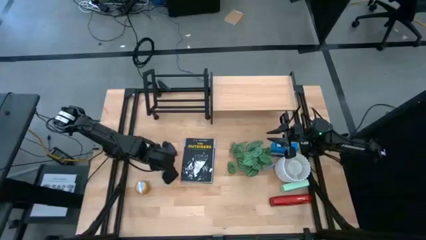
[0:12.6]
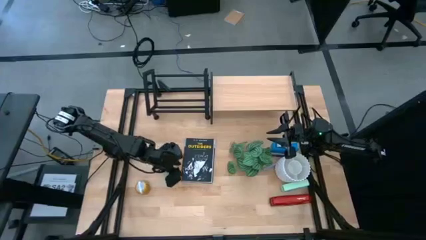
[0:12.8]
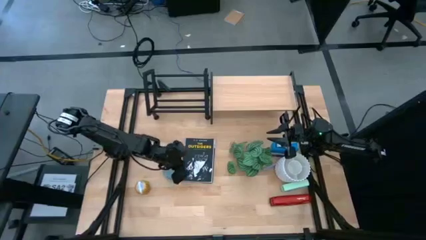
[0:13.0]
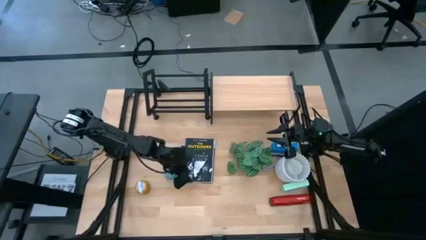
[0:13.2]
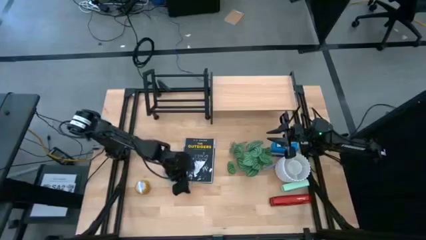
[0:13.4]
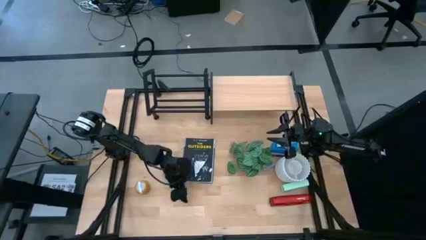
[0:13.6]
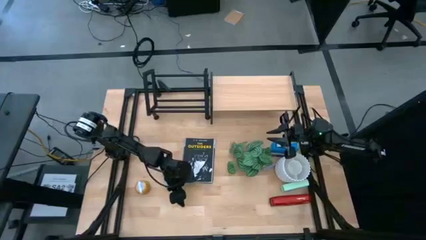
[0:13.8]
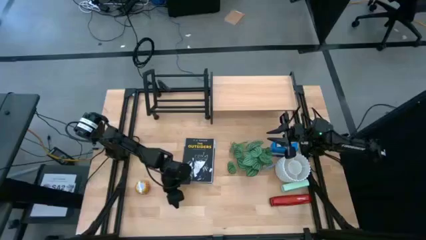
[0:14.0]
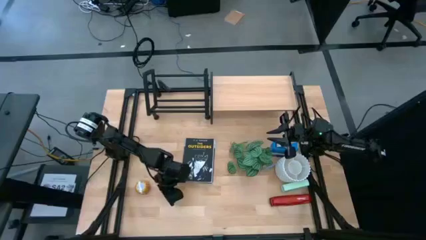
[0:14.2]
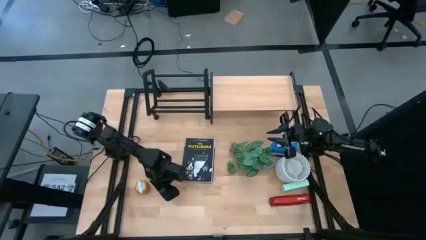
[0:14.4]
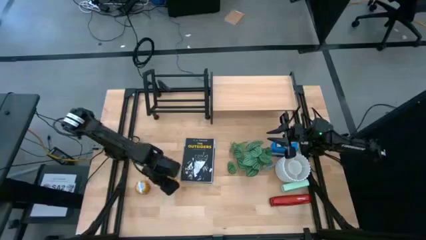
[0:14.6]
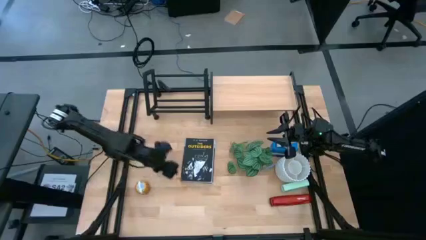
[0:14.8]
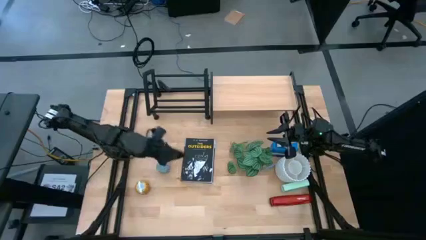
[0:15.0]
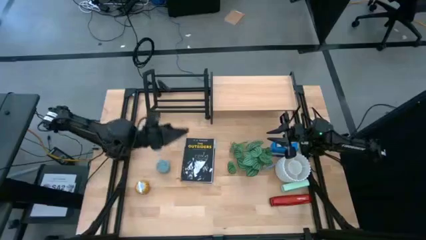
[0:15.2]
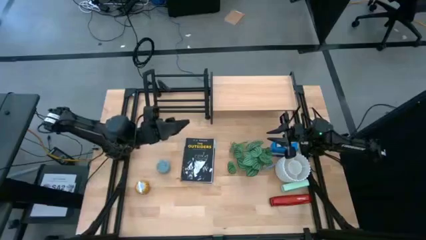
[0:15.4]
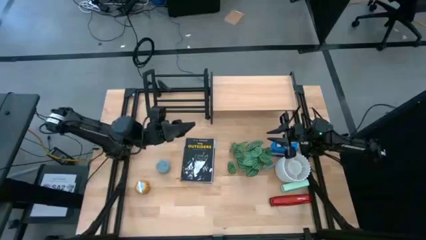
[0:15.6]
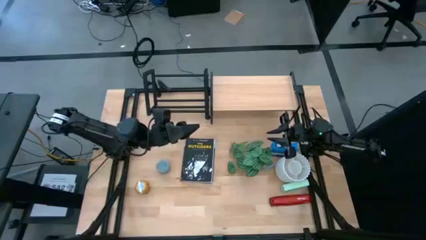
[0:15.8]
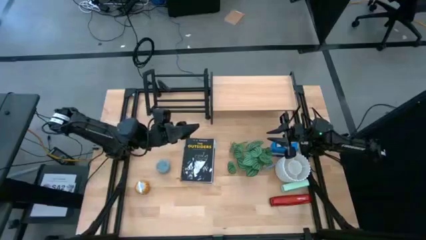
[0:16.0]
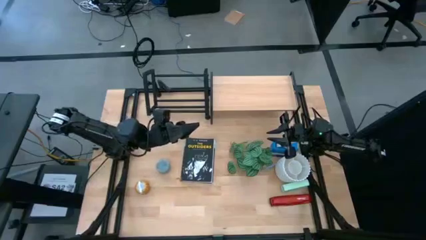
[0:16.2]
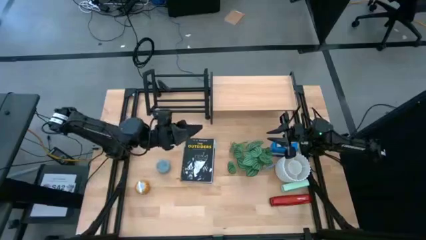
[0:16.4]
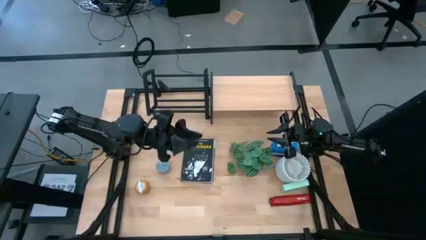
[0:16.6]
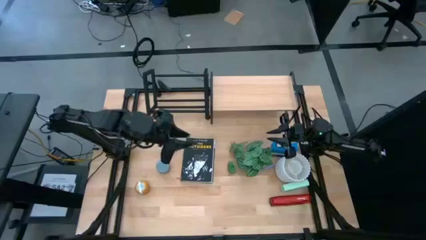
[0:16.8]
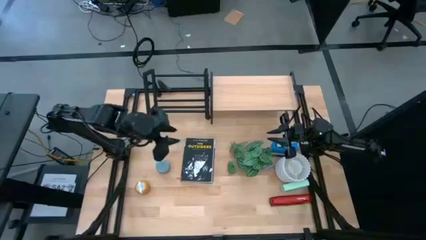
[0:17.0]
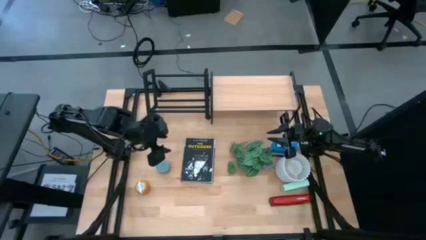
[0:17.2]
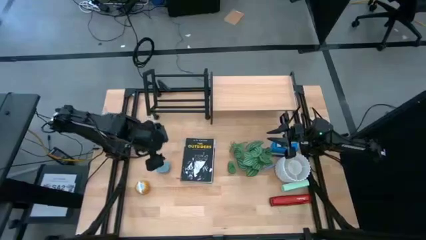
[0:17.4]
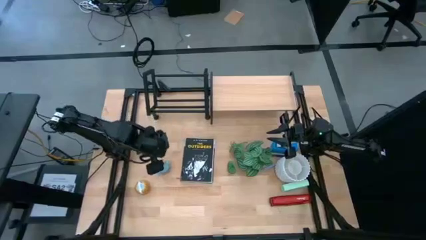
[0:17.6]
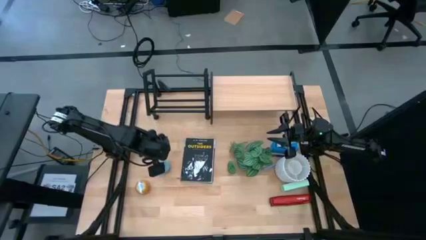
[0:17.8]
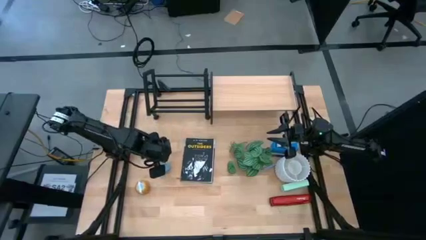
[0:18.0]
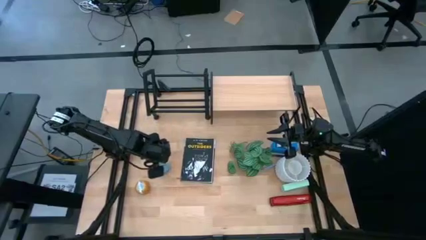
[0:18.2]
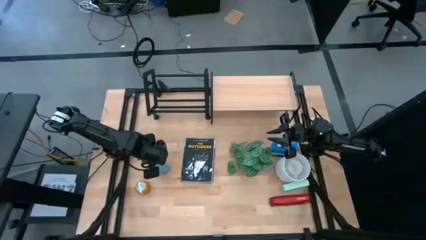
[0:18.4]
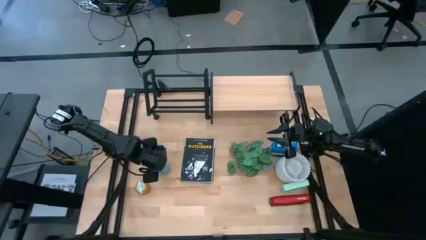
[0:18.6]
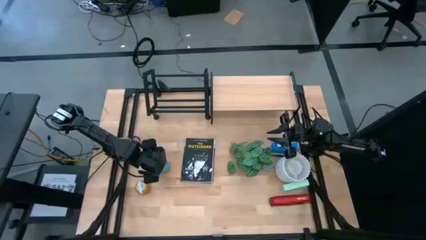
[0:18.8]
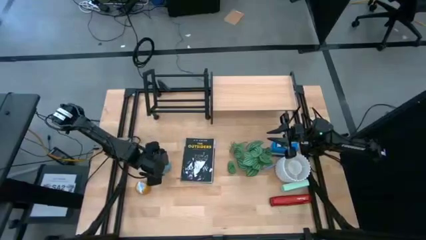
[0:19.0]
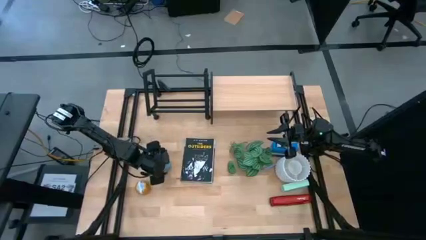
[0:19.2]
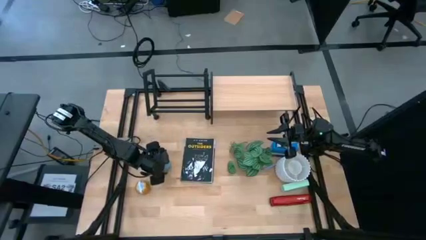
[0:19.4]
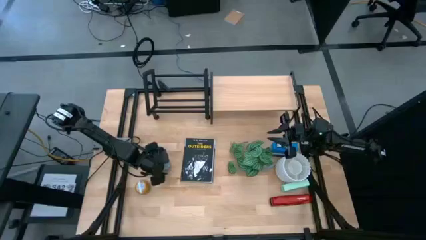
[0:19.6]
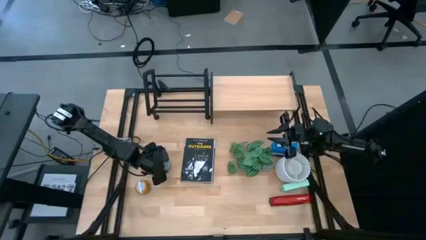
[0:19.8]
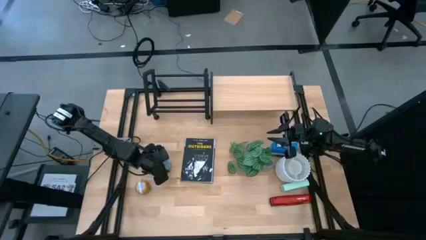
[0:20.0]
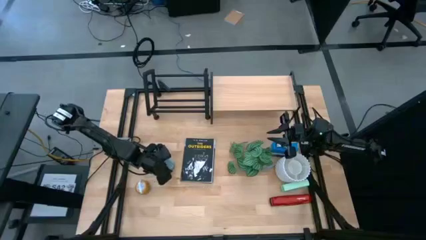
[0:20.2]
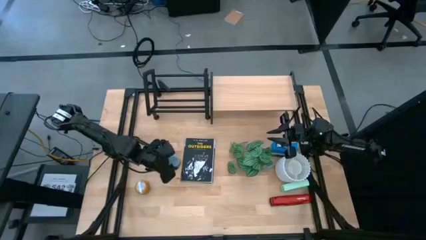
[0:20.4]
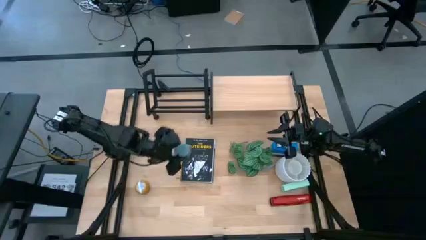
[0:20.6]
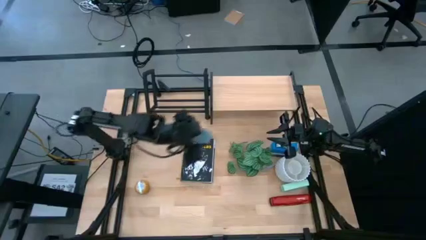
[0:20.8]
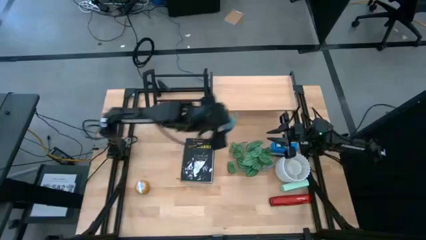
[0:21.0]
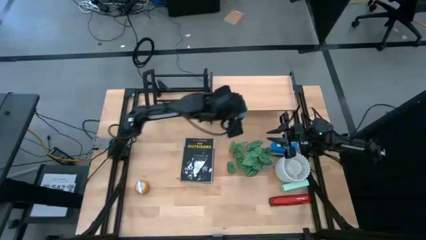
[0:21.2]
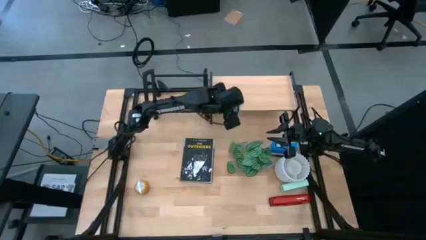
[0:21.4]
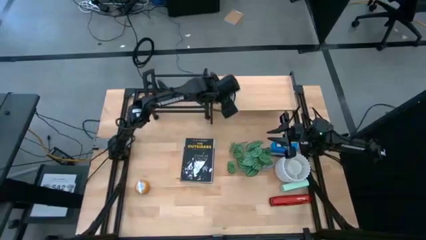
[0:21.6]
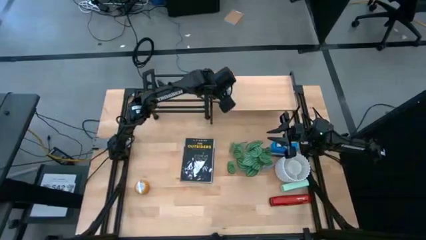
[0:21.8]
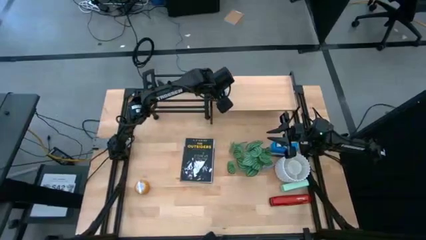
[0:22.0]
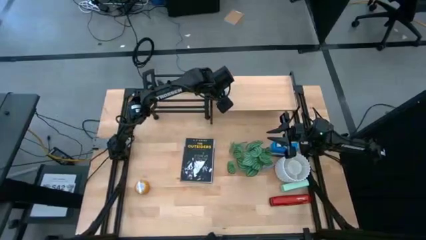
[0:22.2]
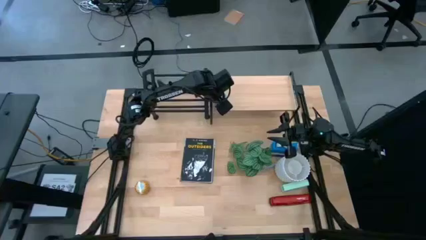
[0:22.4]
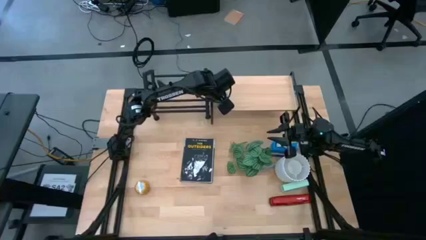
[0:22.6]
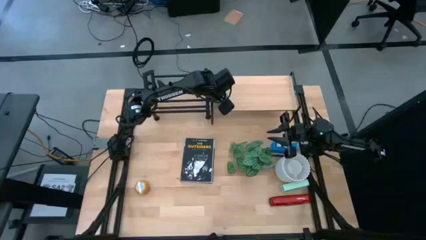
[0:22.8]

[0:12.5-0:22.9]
Task: Stock shelves
Put the blue scented candle on the shelf

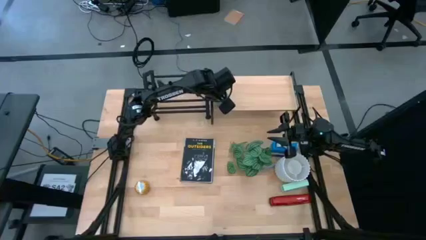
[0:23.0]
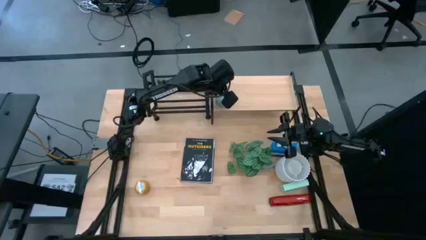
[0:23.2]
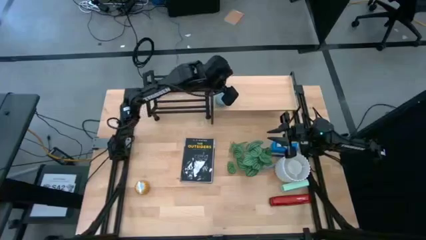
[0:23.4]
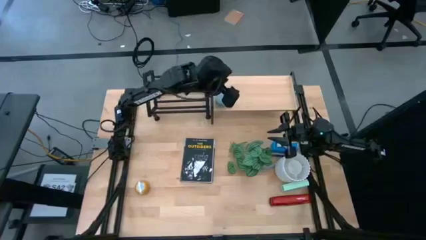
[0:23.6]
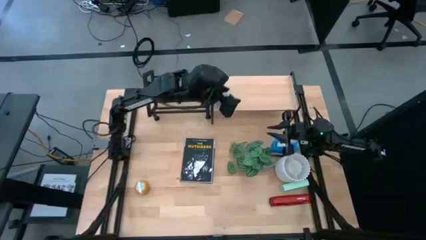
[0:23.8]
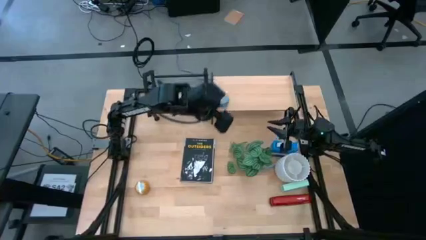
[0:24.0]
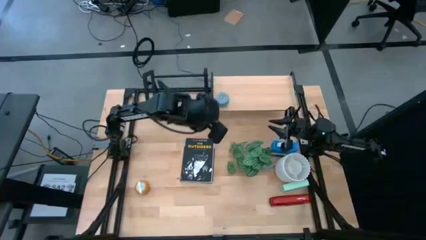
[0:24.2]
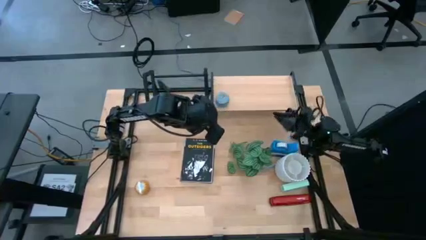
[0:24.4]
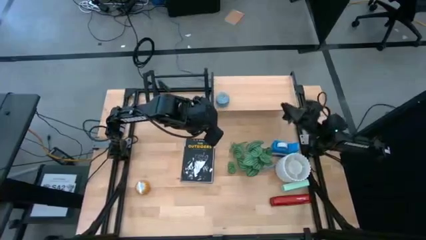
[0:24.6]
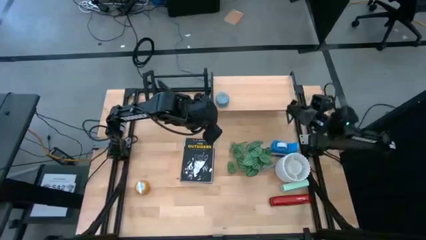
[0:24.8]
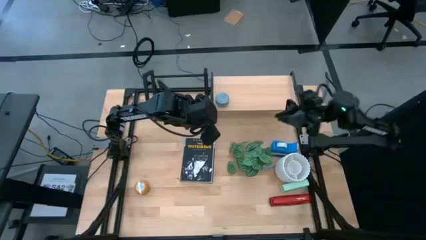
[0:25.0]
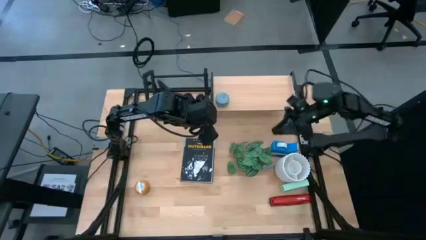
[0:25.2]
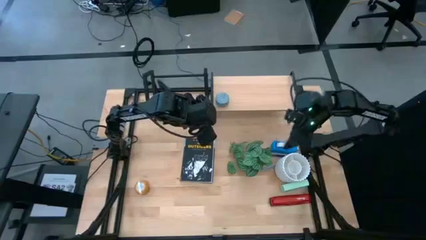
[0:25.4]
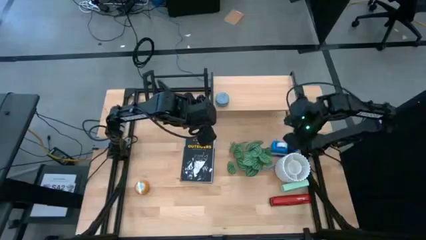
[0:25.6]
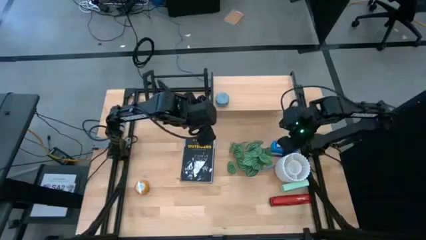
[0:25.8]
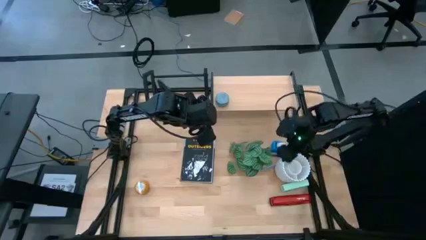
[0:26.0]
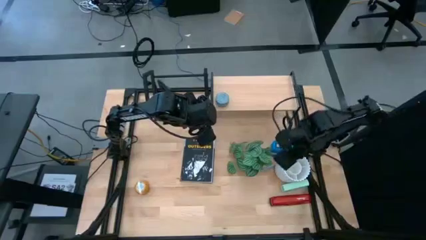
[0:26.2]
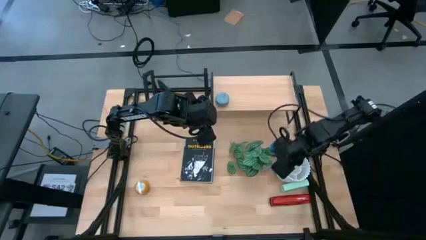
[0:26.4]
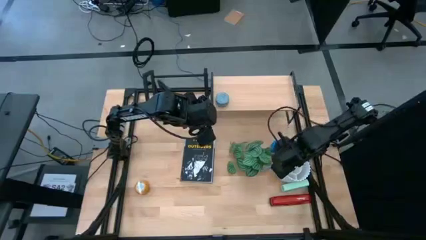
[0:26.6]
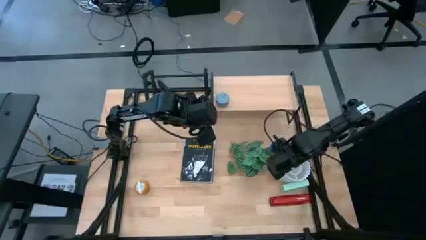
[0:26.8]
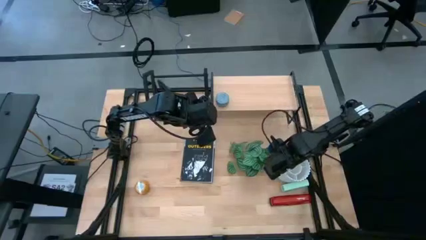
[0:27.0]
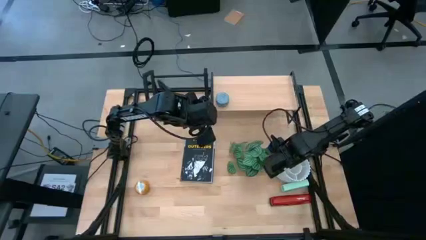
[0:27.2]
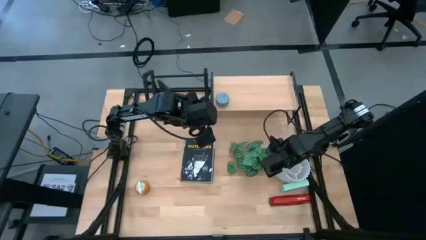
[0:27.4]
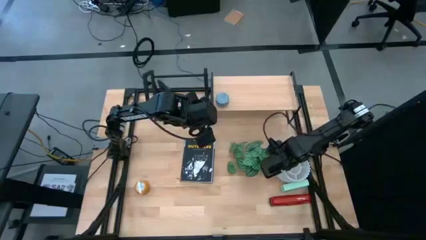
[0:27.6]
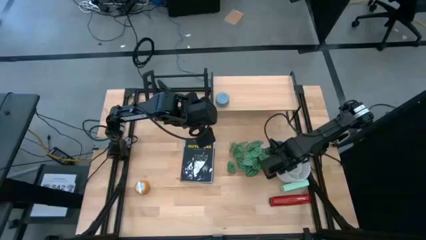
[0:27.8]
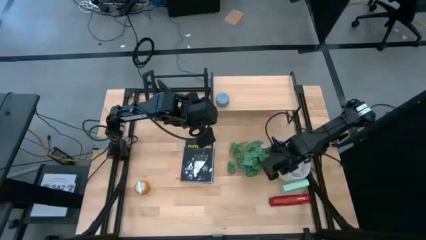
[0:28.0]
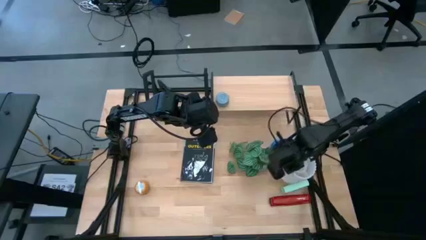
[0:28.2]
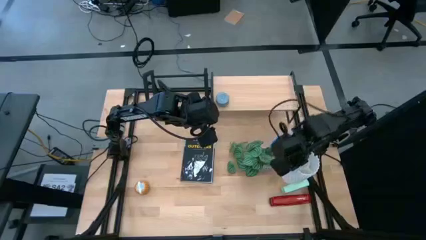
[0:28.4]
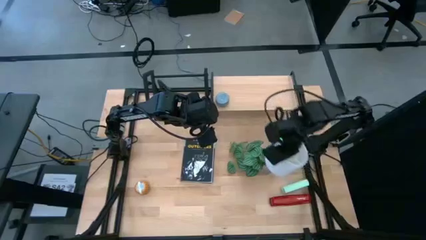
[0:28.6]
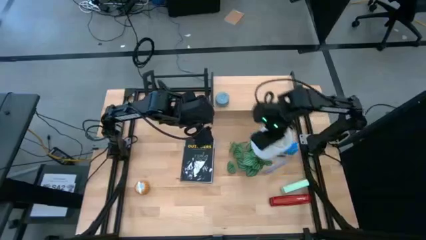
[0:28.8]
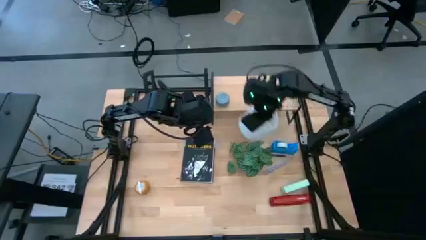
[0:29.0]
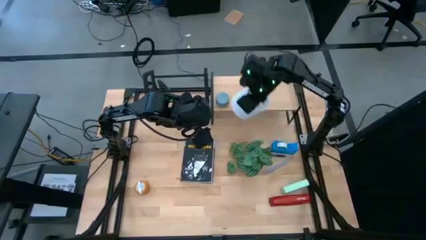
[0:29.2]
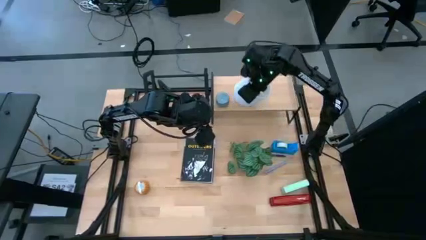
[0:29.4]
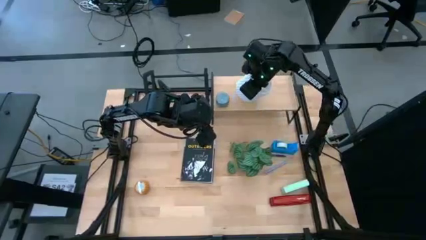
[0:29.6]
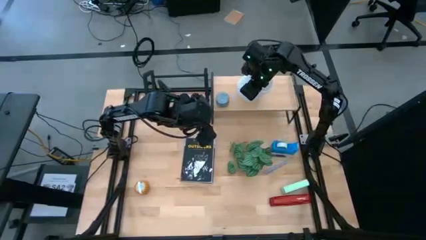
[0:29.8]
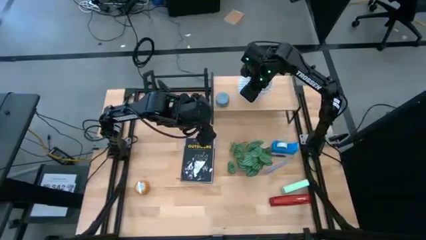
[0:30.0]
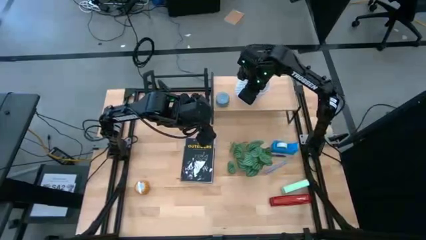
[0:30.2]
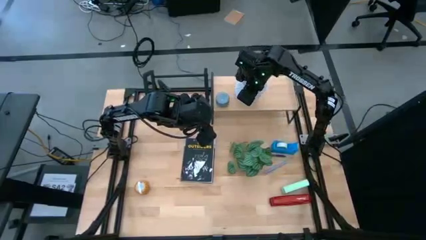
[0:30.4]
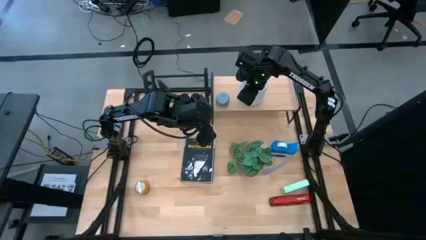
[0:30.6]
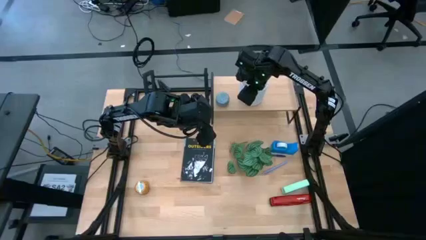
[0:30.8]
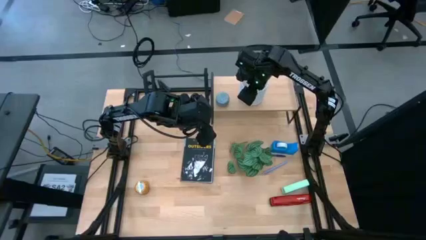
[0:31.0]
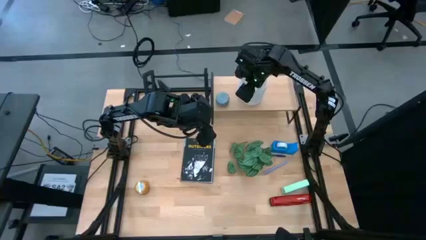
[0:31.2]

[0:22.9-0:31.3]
Put the white pen holder on the shelf
